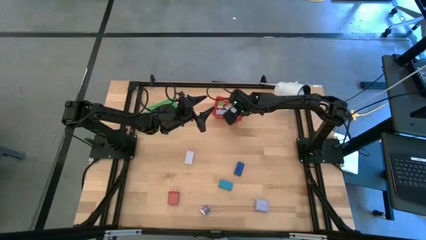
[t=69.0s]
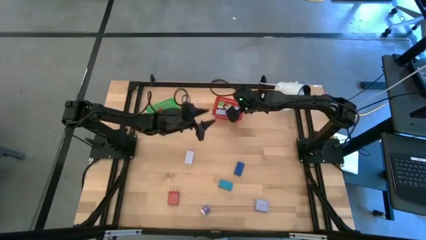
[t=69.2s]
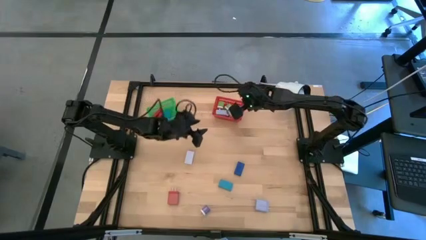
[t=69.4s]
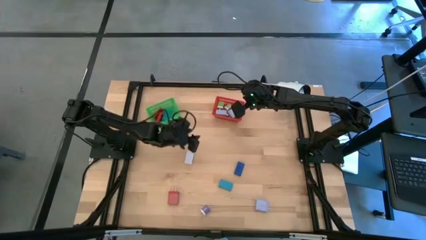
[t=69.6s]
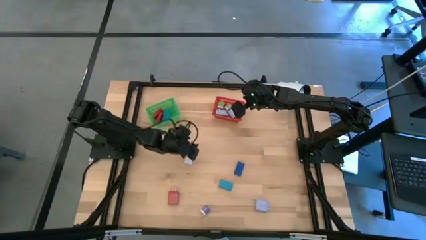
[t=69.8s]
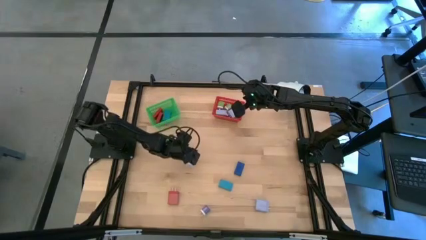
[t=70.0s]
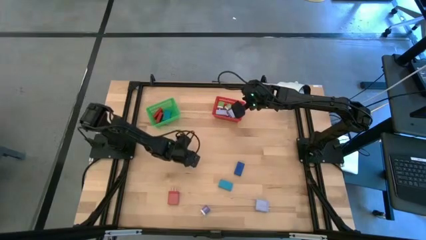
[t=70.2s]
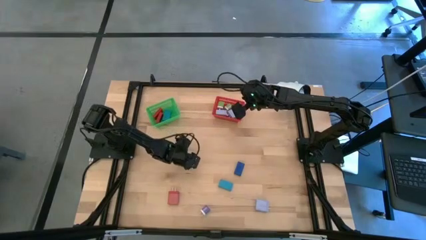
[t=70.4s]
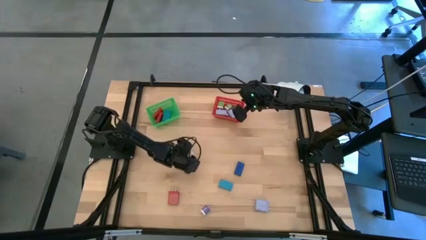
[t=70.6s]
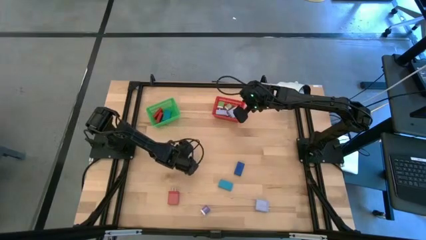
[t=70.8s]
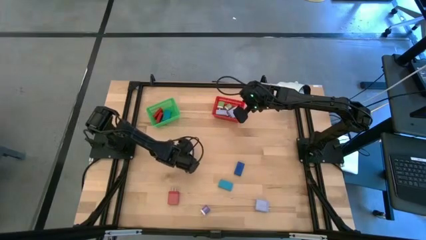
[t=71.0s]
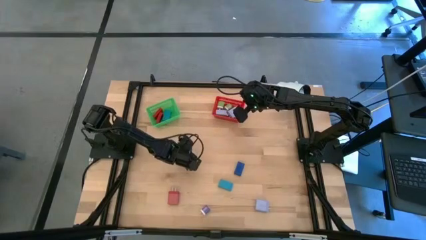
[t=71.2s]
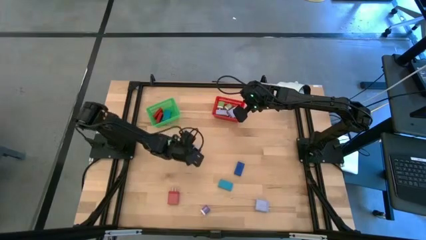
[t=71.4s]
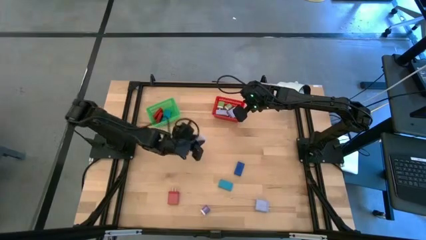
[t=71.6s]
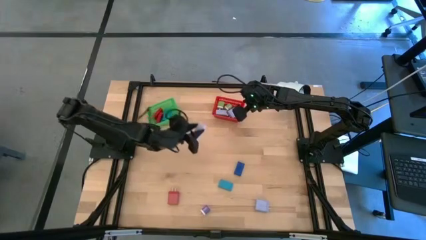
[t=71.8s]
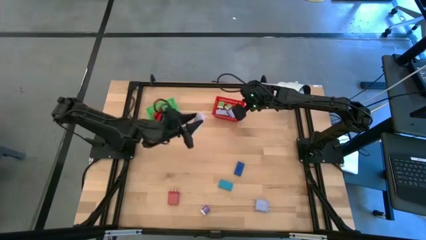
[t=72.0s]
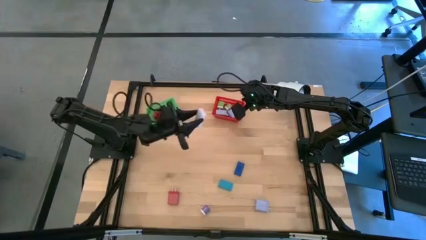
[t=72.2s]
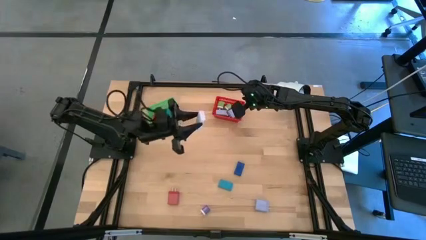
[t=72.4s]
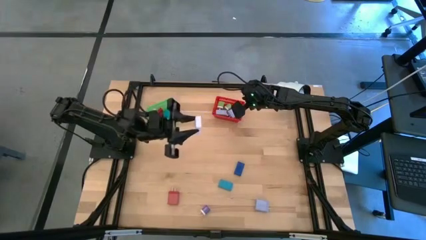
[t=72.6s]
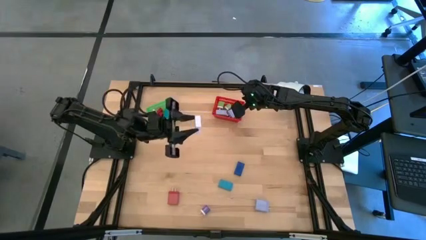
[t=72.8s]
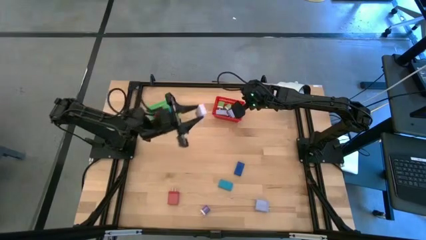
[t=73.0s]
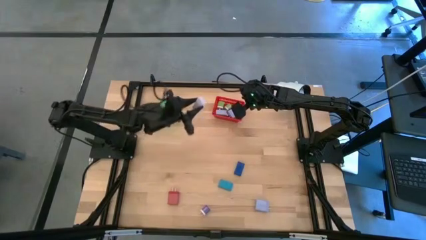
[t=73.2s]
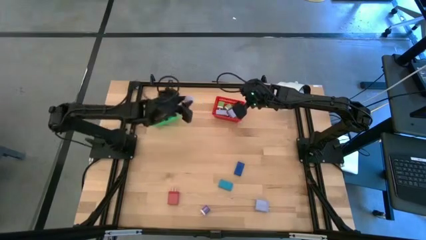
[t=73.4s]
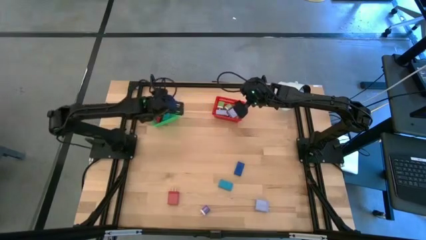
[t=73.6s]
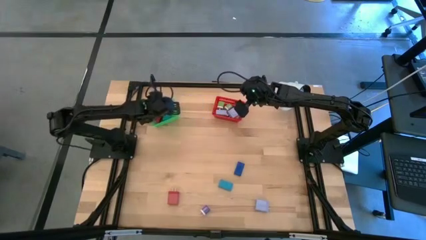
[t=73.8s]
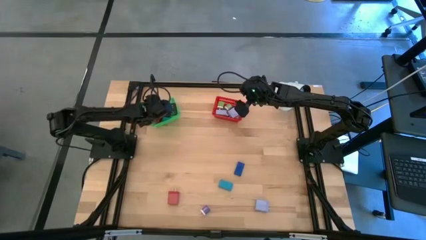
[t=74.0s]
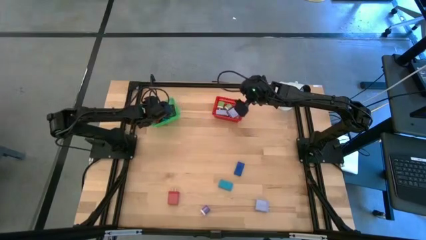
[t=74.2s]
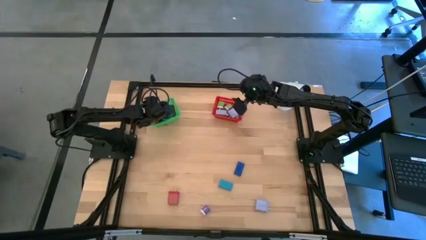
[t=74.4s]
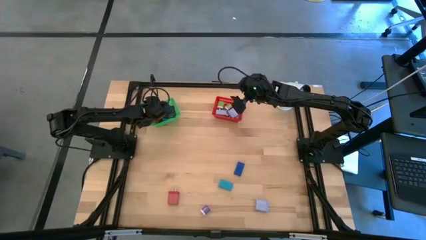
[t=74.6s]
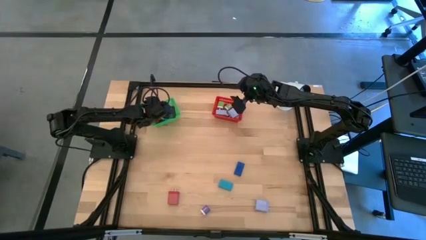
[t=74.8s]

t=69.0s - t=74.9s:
Task: Pick & Place Office items
Put the white digital clock into the green bin

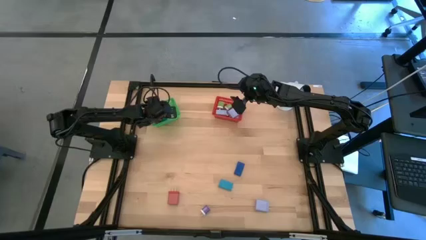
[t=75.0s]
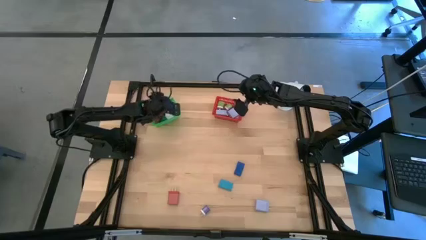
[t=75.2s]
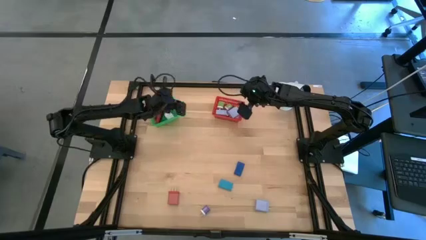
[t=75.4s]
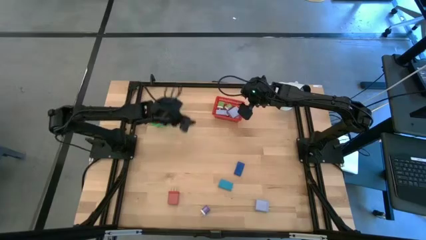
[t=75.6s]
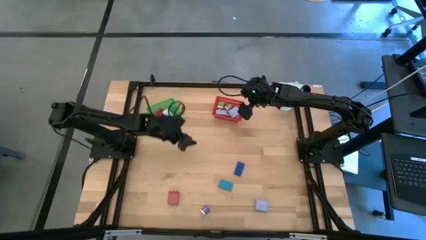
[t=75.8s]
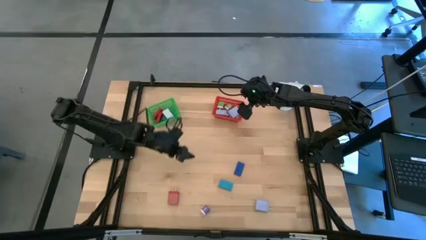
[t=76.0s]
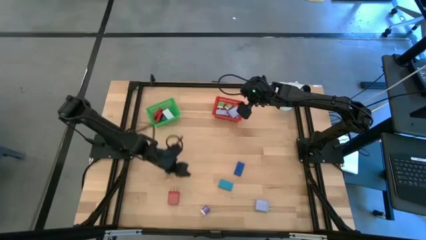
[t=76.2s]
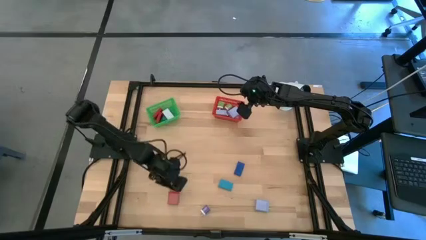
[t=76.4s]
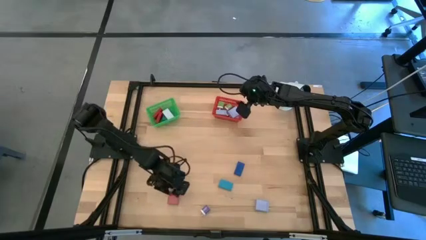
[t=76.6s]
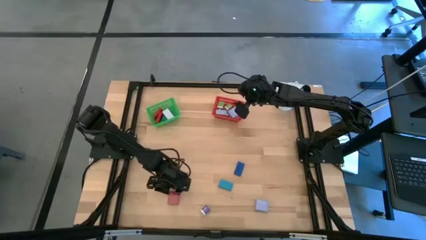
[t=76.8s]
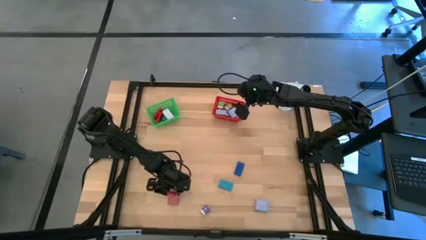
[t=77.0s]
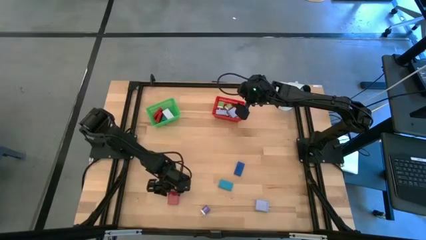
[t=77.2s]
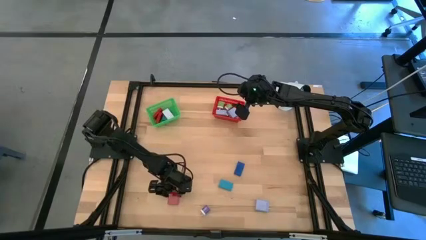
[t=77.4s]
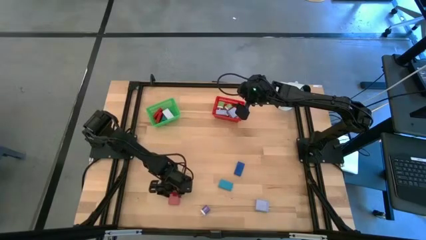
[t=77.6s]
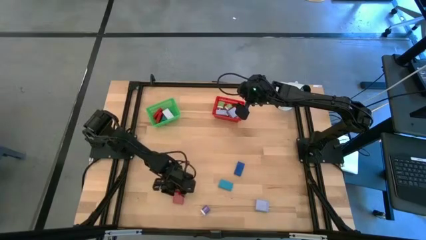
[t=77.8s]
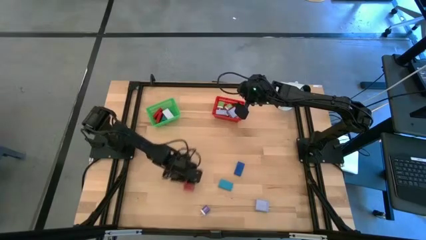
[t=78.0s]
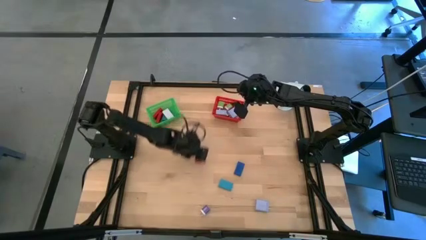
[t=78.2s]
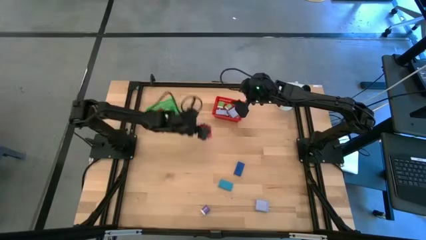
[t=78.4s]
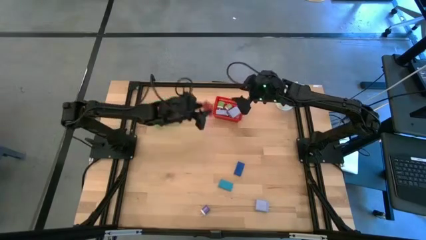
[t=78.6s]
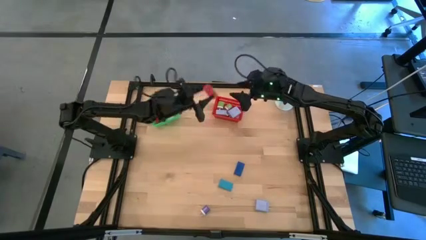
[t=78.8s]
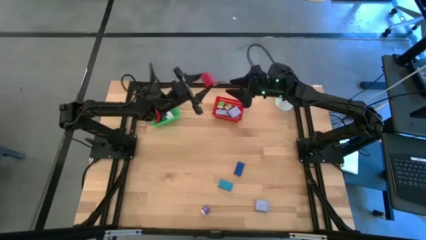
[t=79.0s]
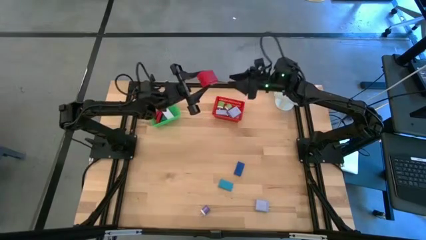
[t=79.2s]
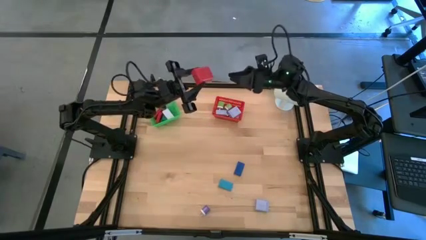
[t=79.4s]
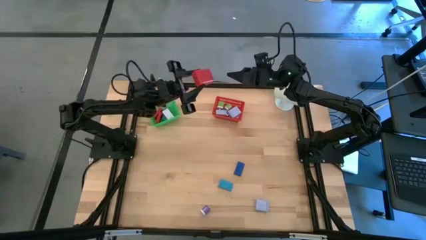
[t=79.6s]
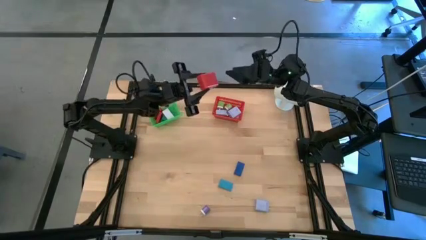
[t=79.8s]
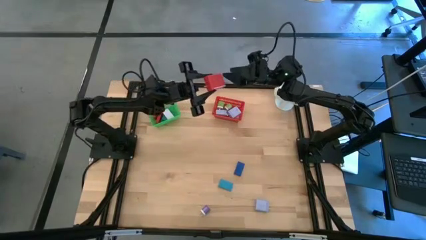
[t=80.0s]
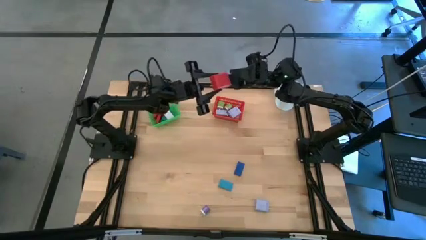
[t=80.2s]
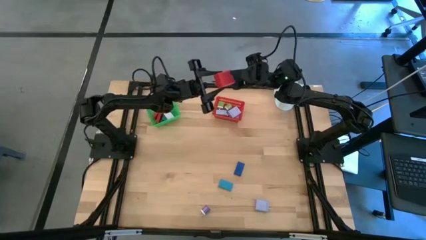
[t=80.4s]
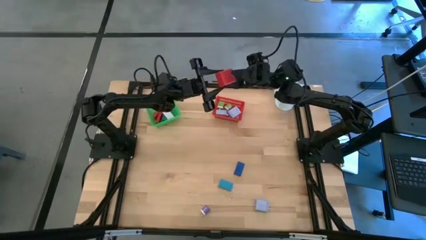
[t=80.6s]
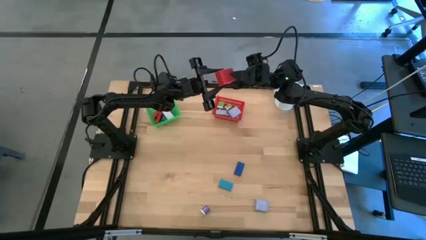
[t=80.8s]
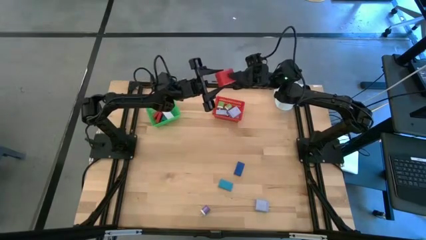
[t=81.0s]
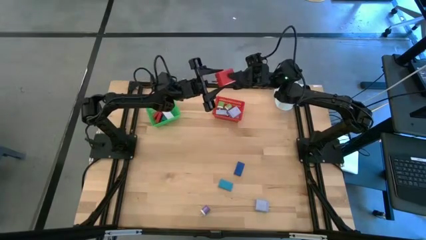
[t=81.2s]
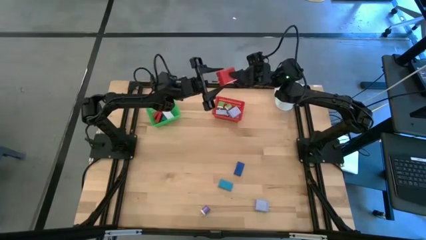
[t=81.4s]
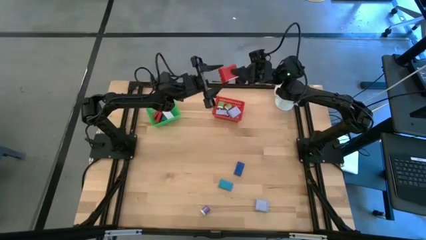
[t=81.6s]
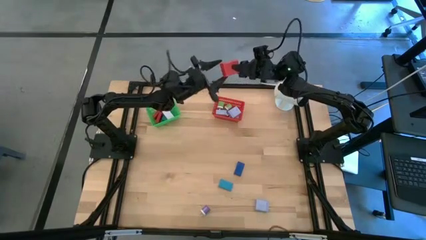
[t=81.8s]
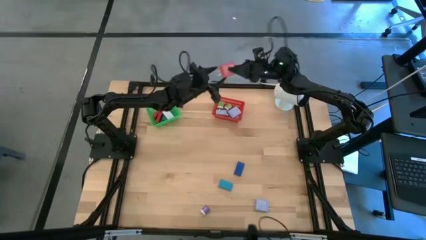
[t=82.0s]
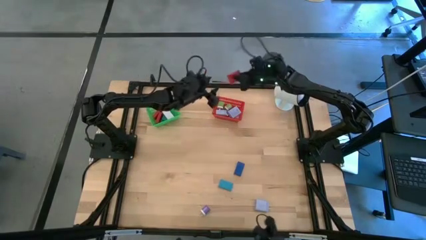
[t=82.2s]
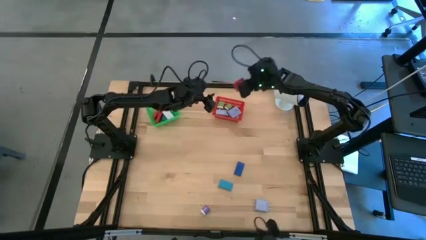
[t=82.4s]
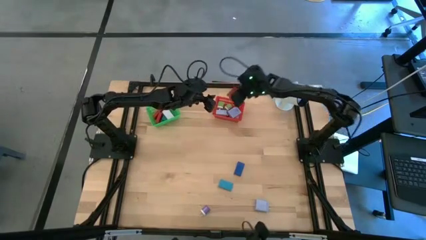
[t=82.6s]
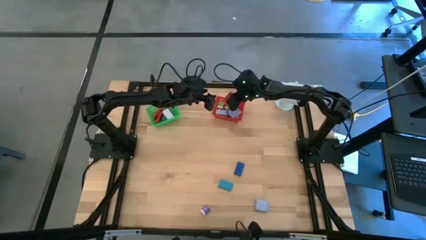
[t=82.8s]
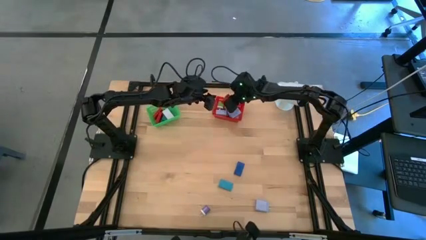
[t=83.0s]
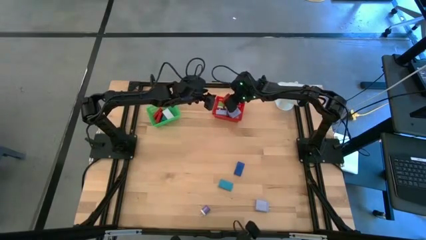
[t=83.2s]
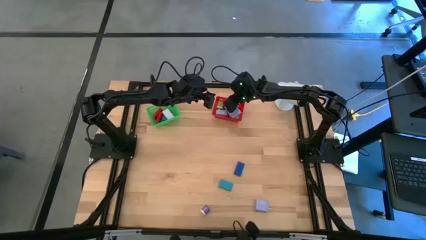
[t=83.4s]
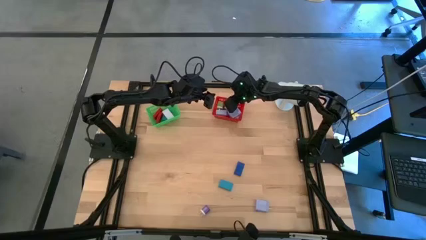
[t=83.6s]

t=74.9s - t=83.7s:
Put the red charger adapter into the red bin

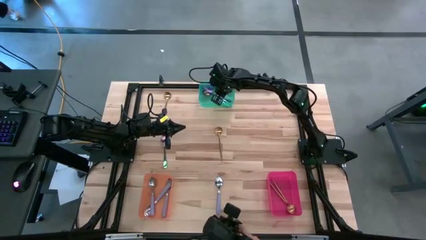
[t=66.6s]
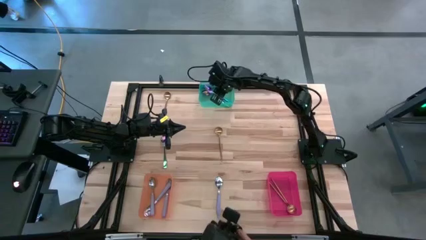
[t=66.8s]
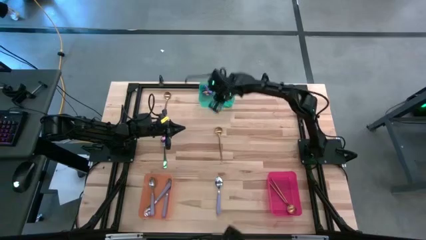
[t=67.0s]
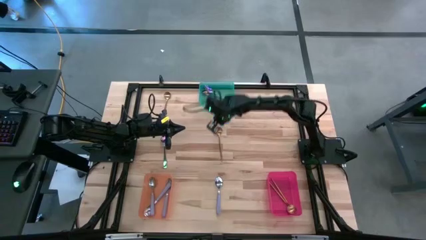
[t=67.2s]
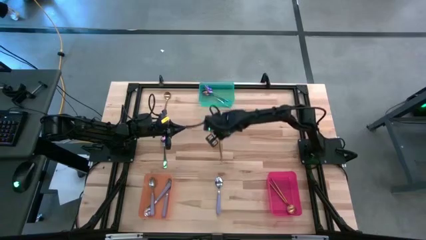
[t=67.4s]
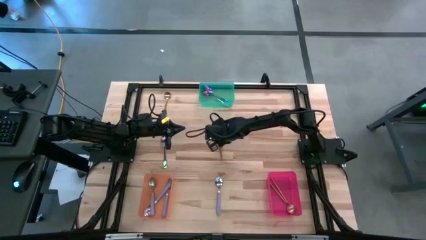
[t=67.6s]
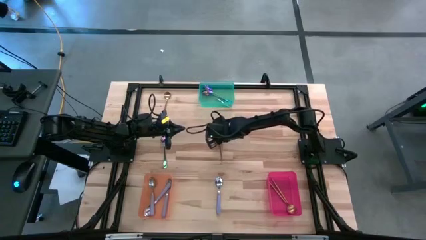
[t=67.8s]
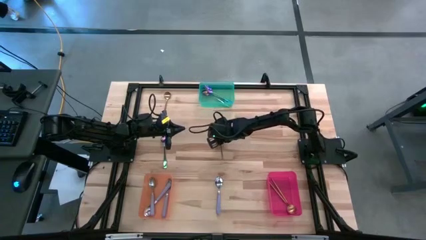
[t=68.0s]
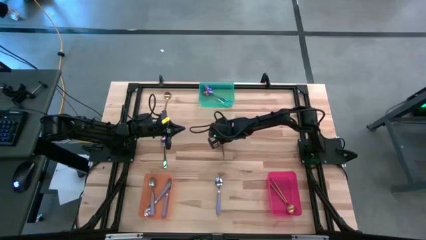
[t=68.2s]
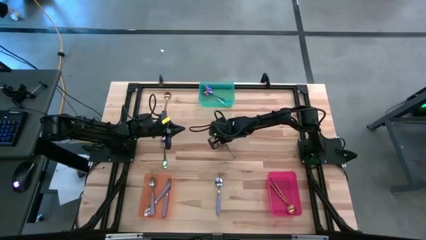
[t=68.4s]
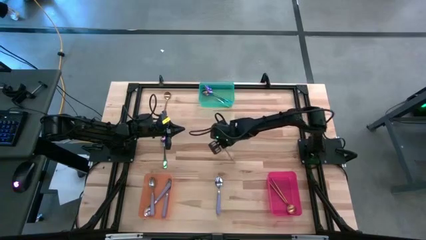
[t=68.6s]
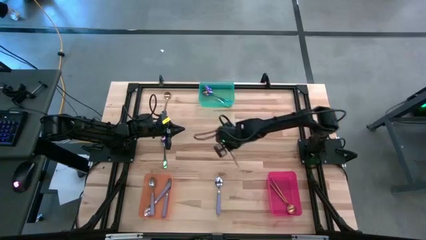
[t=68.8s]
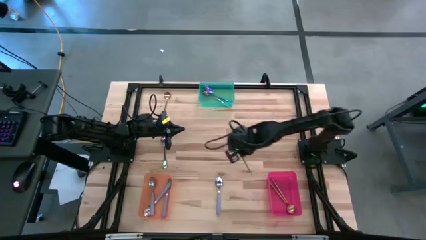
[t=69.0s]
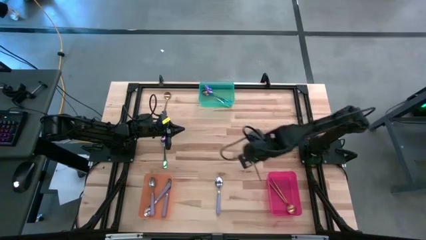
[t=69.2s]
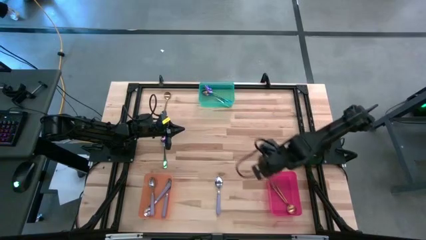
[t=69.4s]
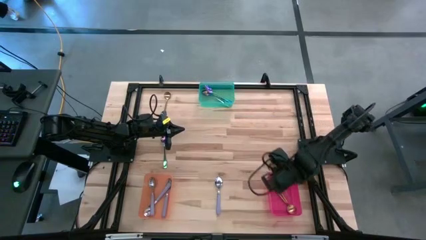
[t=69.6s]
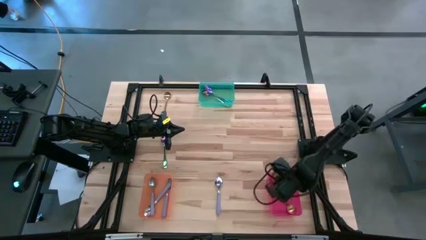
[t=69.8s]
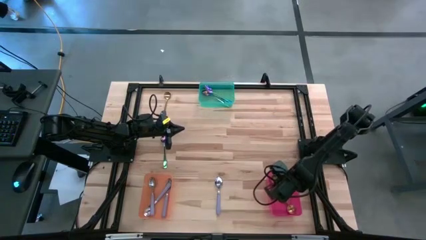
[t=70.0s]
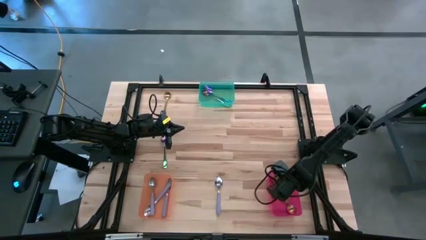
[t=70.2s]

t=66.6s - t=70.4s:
Task: Sort silverware by color (type)
Put the gold spoon into the pink bin
